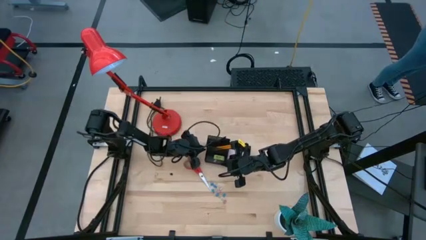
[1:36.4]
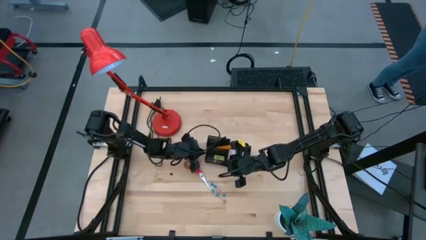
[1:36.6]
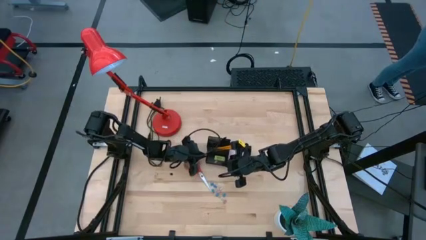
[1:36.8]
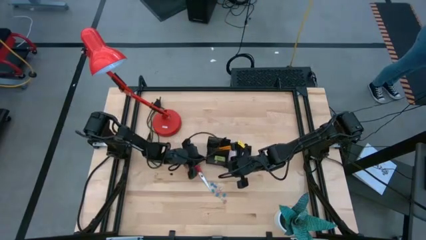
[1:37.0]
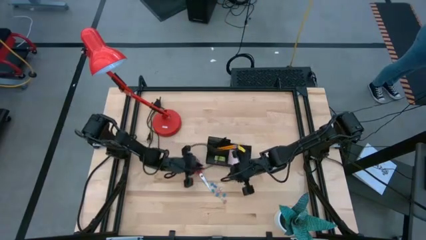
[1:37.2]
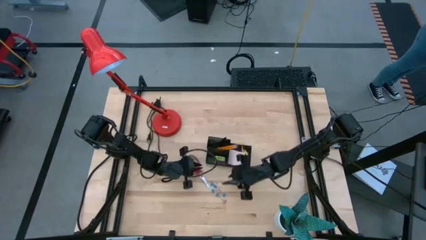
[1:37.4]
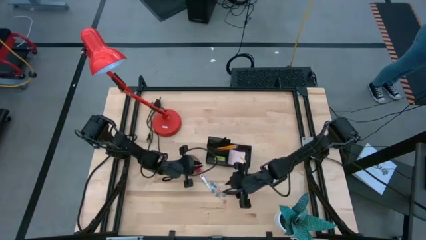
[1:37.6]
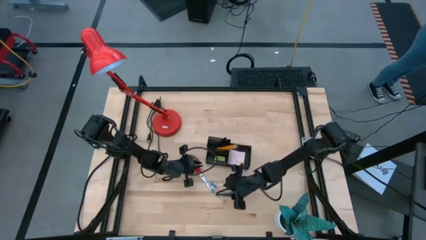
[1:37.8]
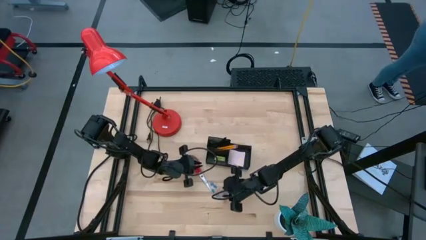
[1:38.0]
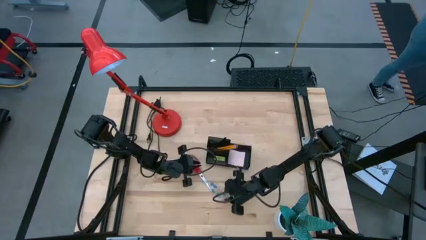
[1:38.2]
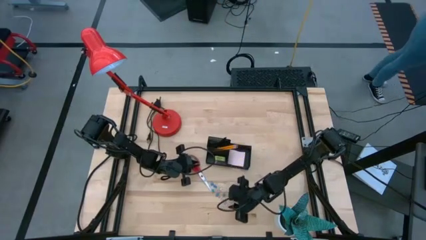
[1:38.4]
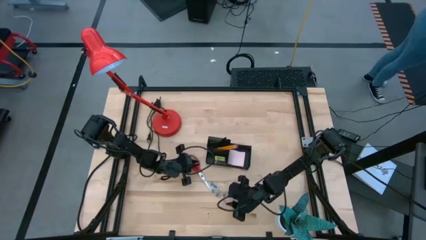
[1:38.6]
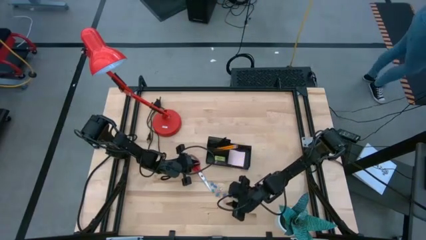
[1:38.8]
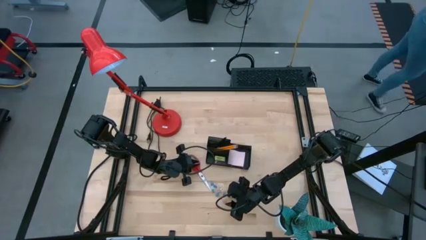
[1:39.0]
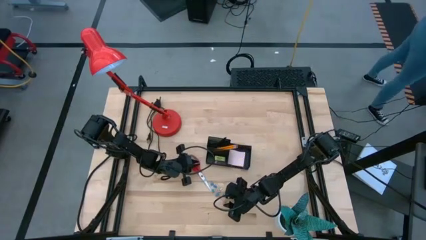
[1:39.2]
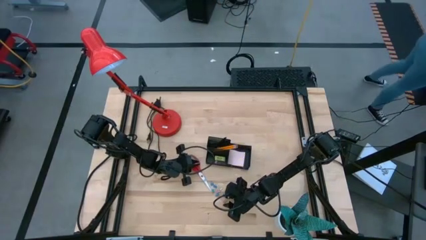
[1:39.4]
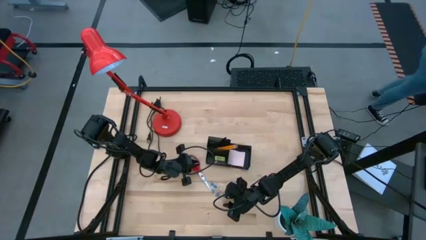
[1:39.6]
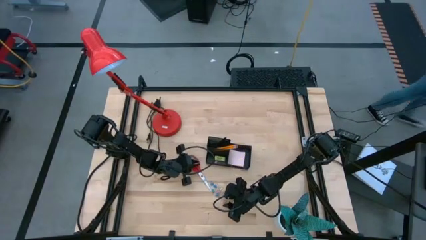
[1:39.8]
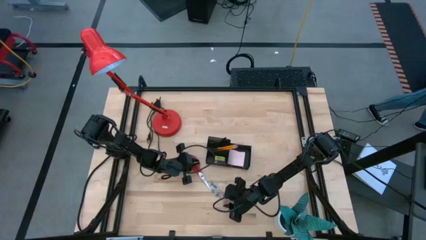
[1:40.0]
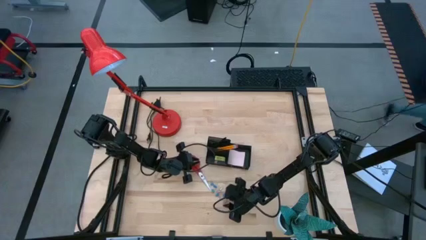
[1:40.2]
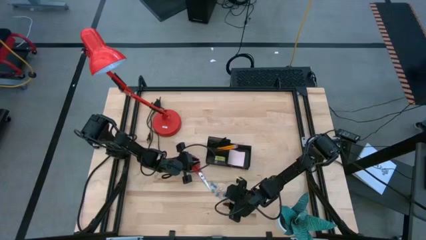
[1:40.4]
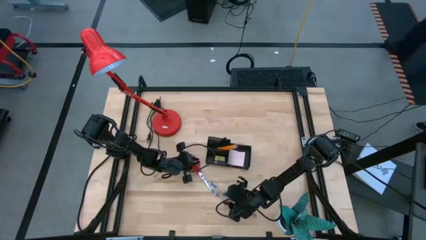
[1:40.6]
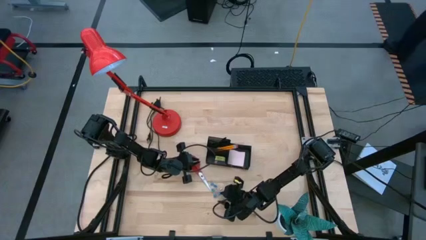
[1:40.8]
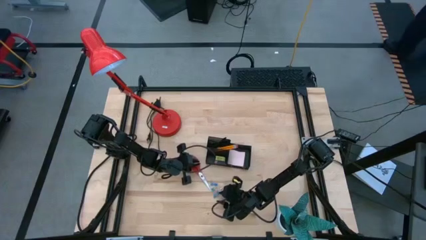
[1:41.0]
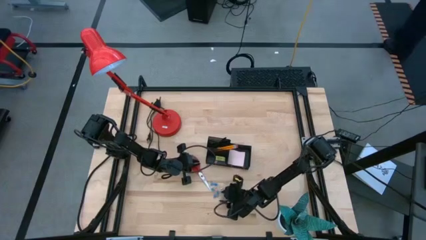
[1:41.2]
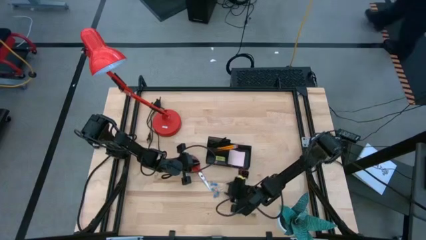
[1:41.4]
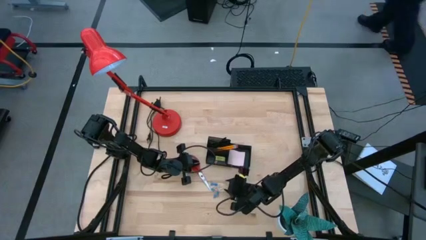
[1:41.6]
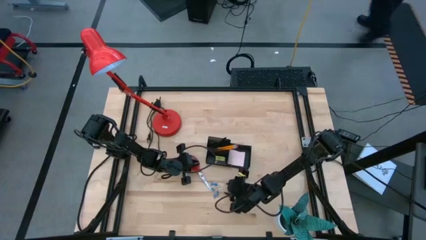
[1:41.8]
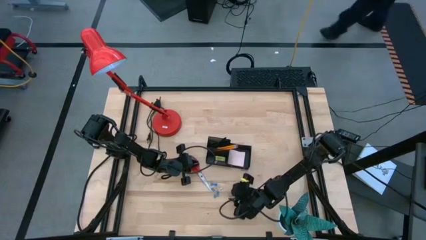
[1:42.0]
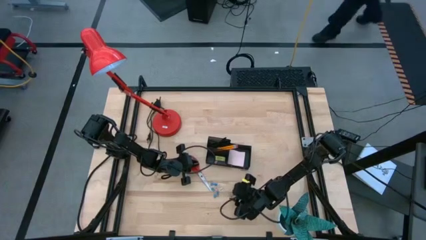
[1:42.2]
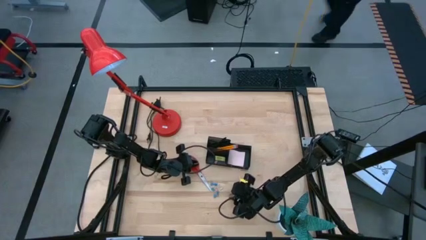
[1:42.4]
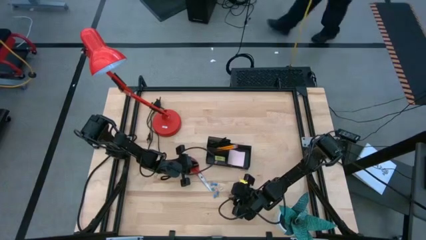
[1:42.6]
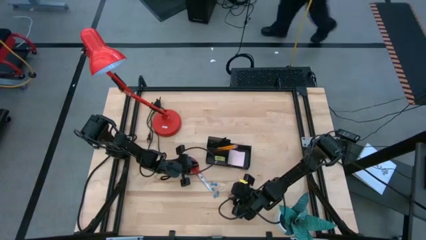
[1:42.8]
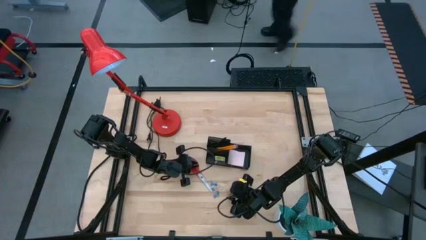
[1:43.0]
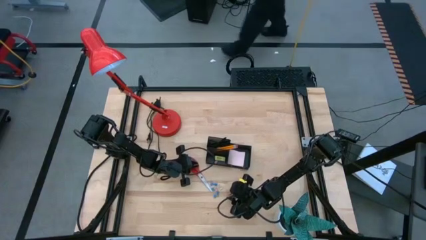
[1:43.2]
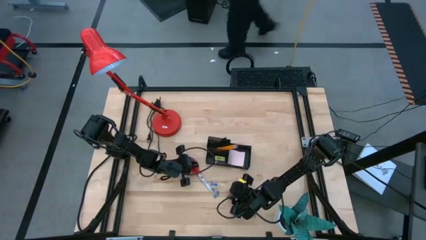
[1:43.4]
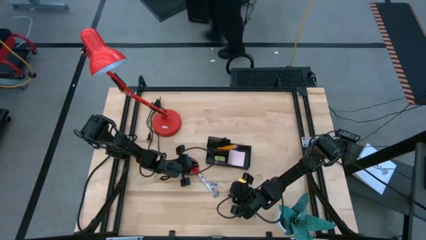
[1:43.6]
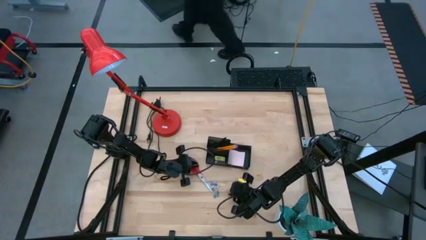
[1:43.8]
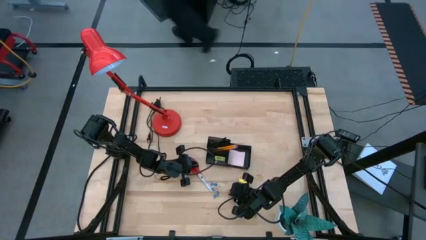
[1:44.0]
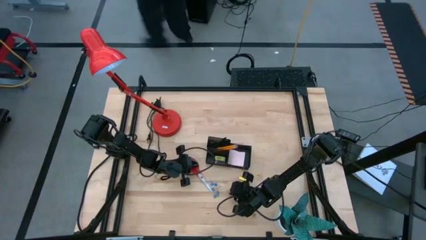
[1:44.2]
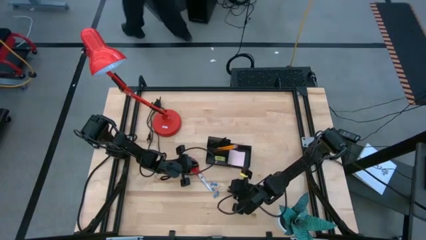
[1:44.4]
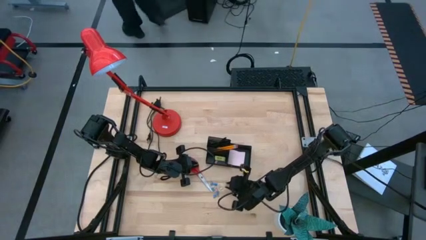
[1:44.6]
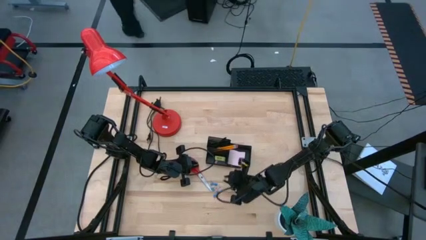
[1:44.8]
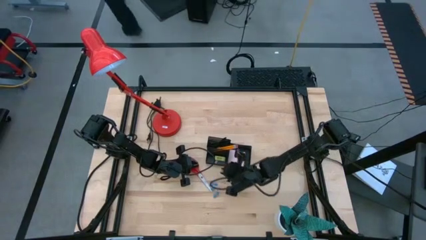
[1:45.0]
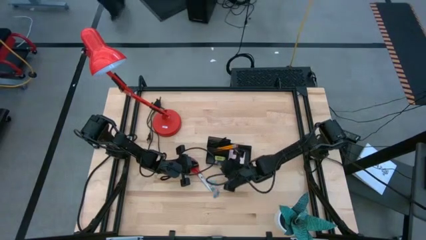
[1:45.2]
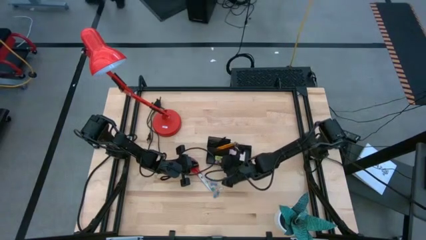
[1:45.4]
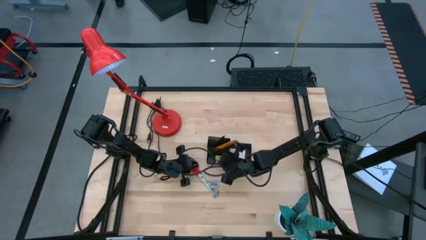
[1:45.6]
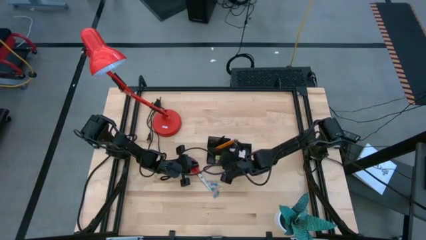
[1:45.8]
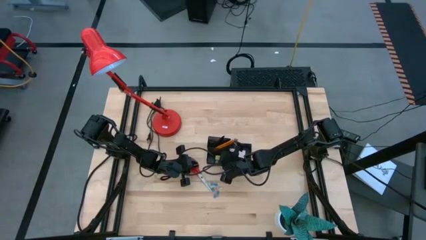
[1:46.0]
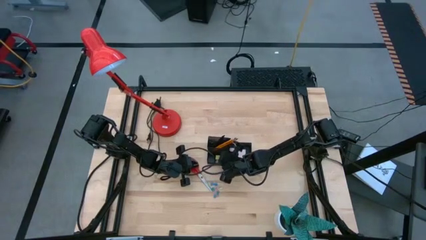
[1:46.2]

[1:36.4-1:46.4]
Task: Pick and place office supplies into organizer
Put the pink binder clip into the black desk organizer

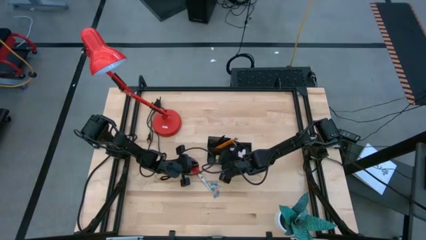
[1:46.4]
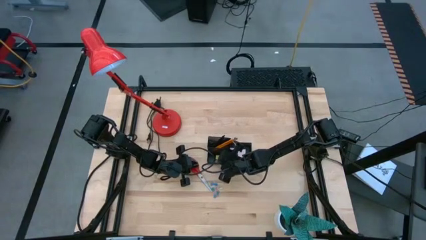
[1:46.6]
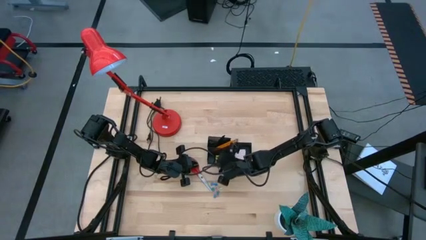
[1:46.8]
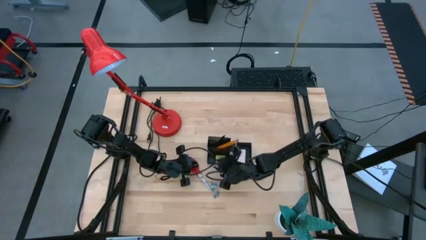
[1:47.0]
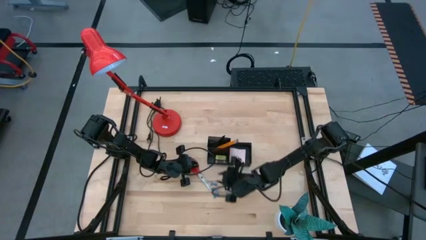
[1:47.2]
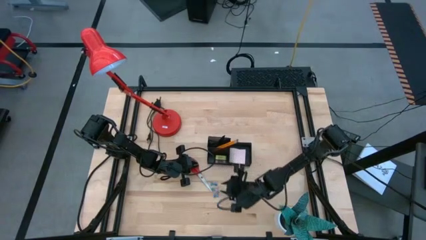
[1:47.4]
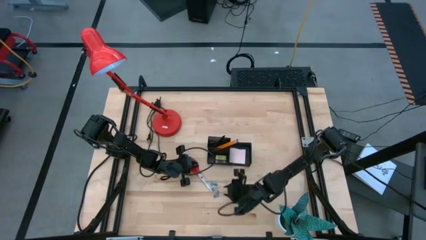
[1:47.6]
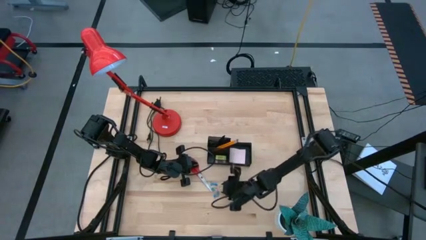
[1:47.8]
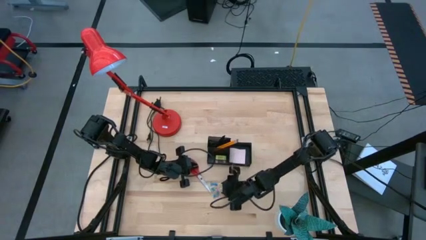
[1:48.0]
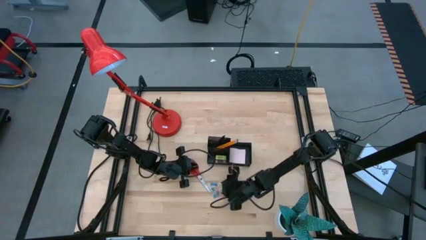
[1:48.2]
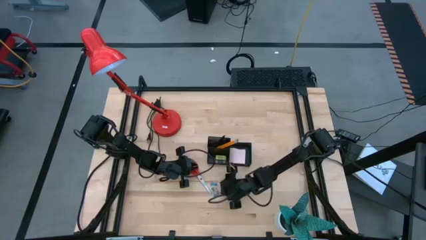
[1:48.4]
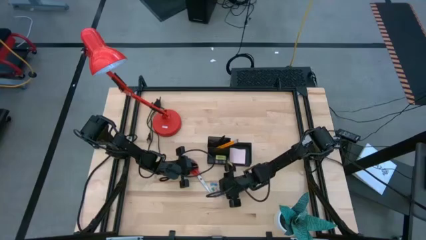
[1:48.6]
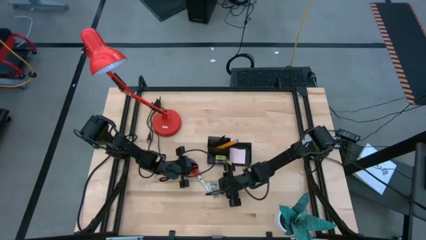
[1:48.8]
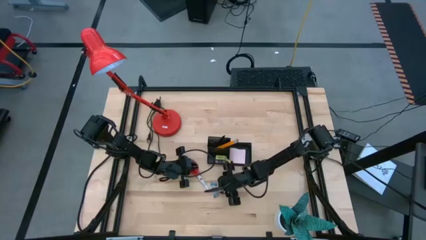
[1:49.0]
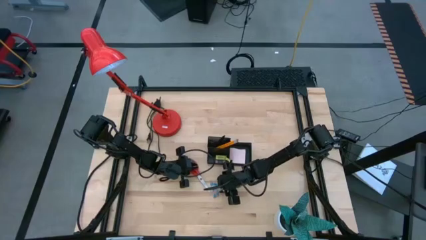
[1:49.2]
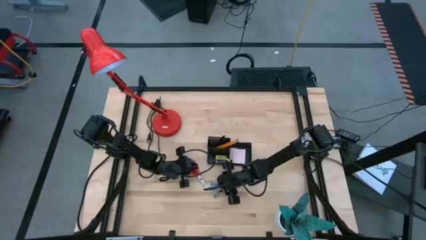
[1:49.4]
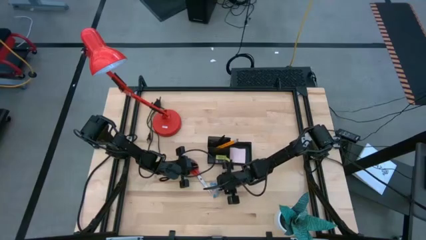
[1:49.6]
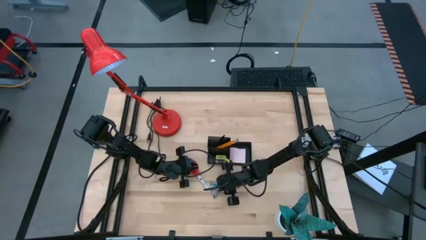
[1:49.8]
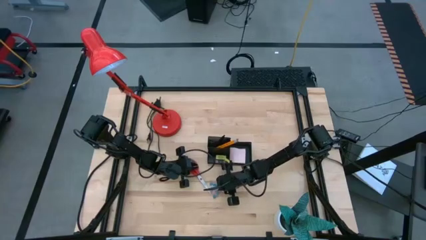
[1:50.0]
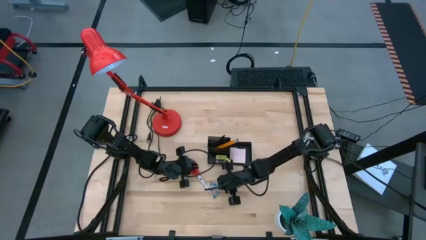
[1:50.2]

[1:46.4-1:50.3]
Put the green binder clip into the black desk organizer

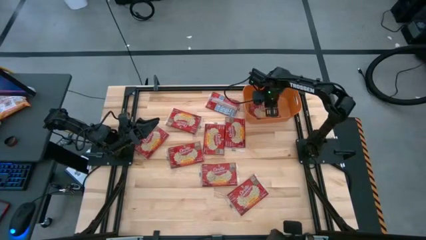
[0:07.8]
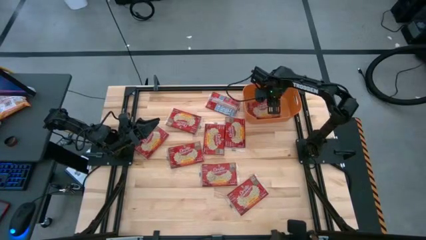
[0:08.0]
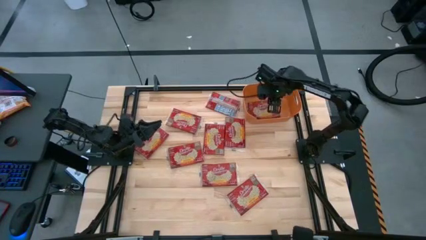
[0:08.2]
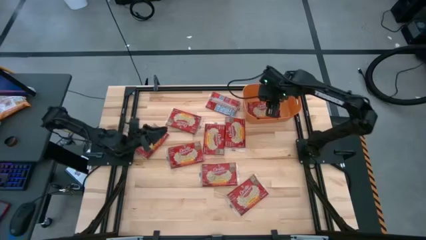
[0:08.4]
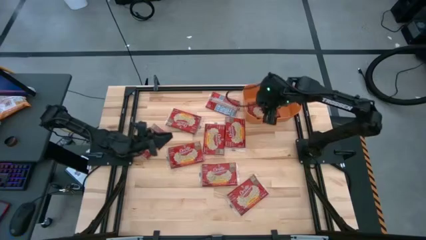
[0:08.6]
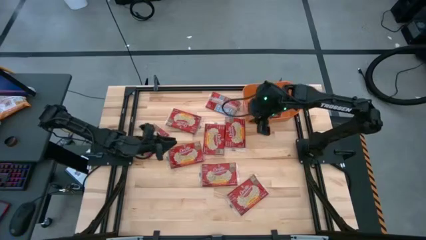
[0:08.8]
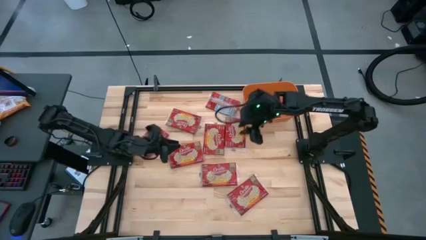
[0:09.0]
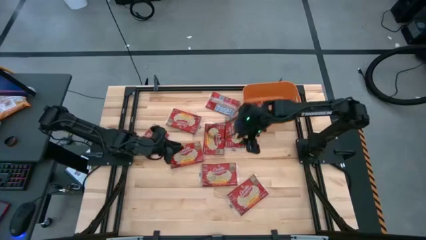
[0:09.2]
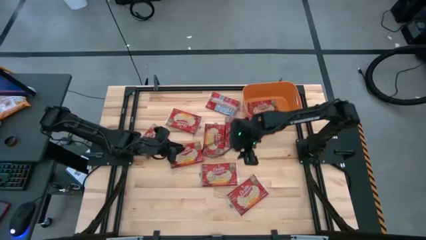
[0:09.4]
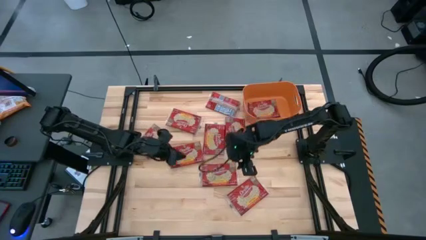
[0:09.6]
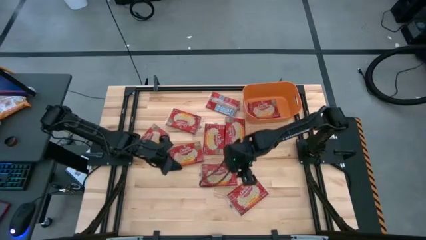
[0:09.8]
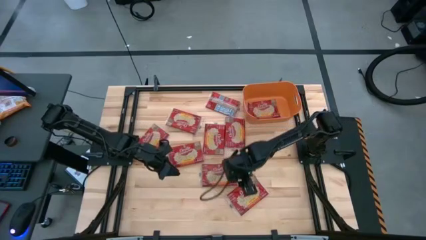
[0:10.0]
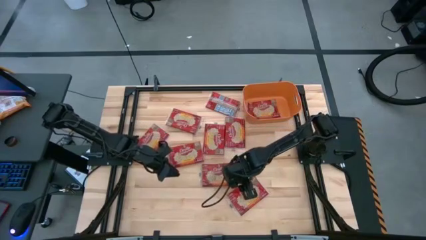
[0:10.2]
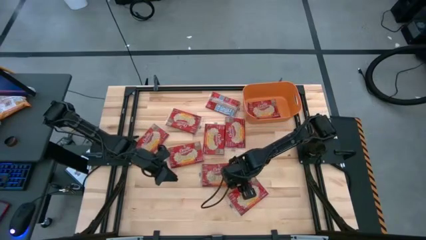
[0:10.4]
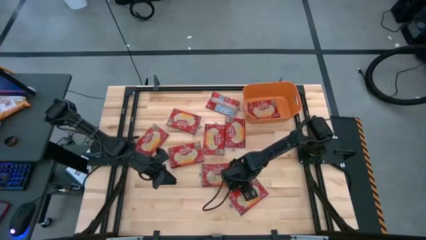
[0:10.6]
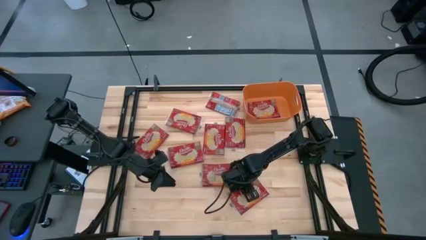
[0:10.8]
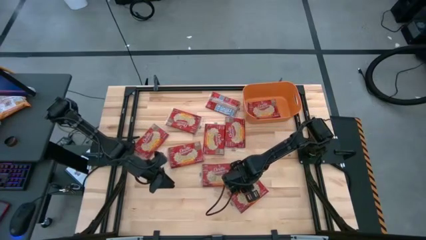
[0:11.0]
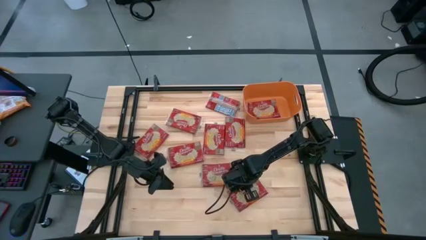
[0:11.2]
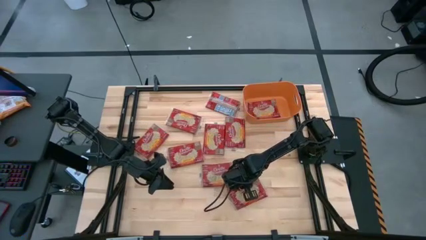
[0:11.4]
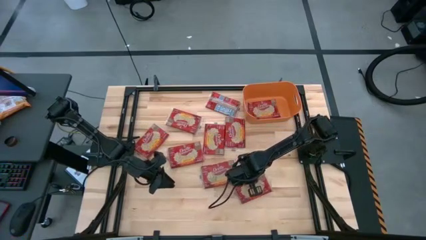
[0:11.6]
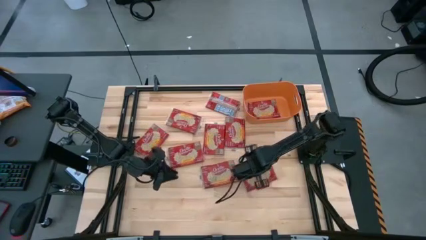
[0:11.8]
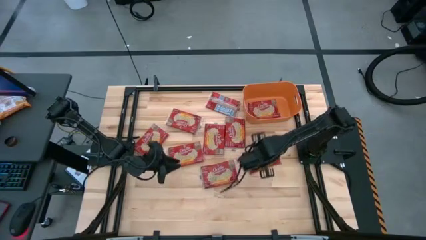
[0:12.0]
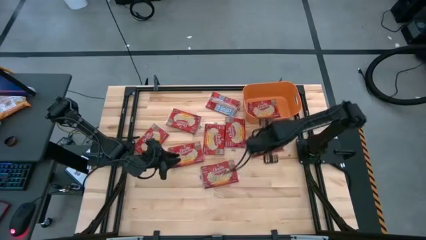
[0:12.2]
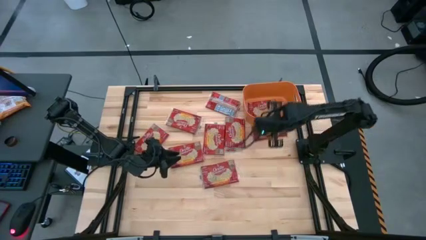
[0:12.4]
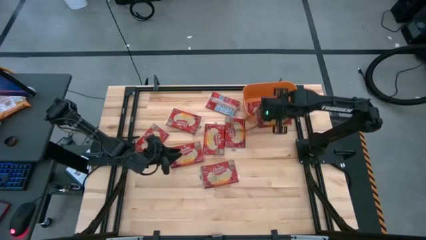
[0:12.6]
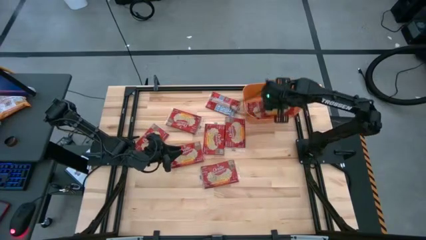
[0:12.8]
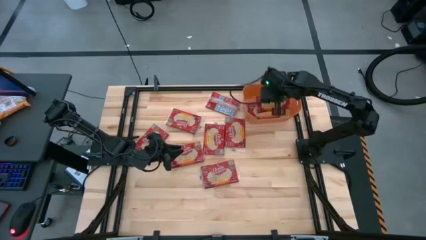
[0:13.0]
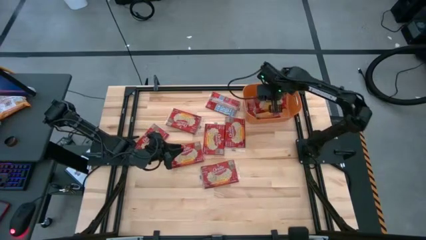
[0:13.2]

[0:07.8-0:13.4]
Task: Sort popcorn bags into baskets
Put the red popcorn bag into the orange bin
